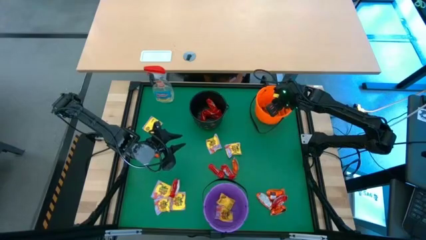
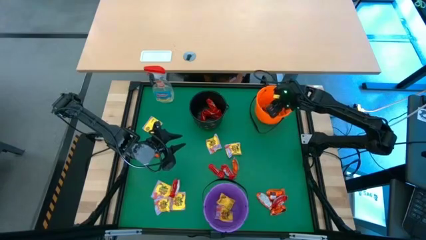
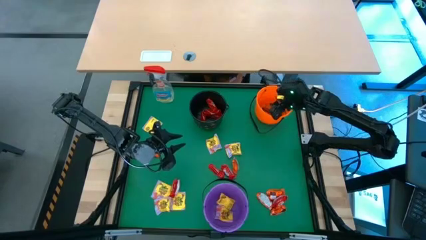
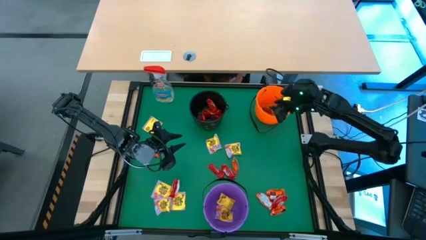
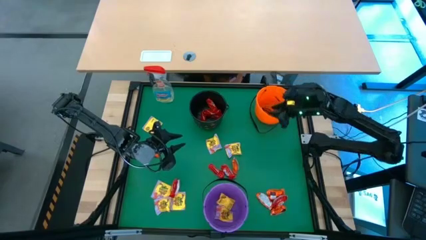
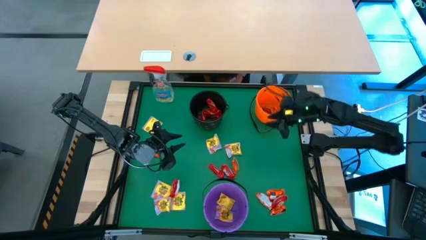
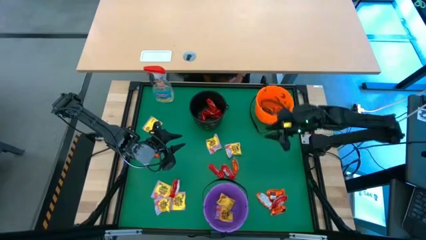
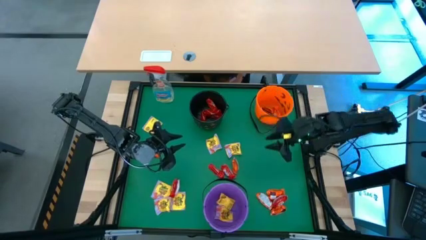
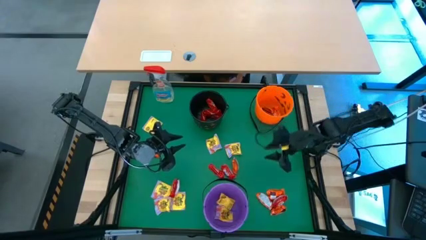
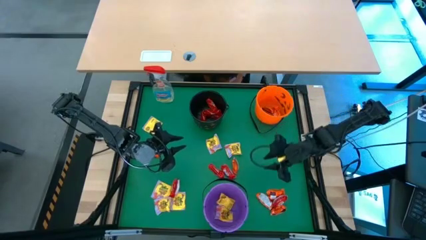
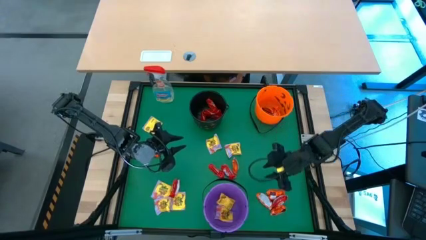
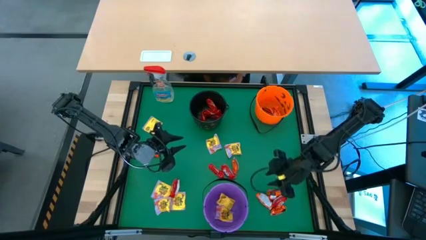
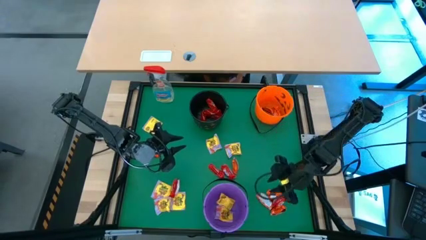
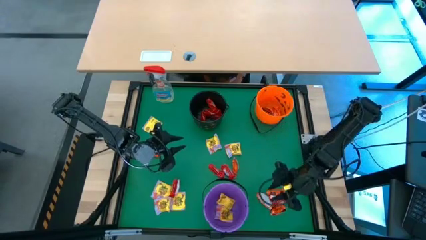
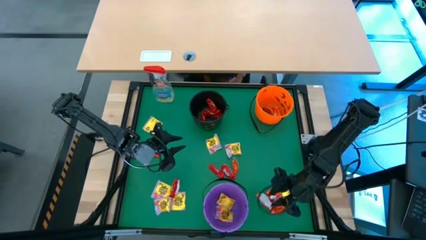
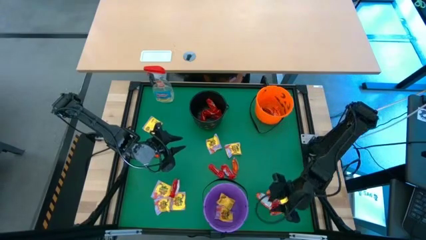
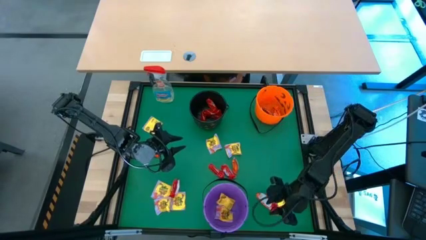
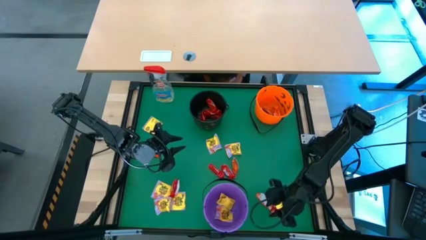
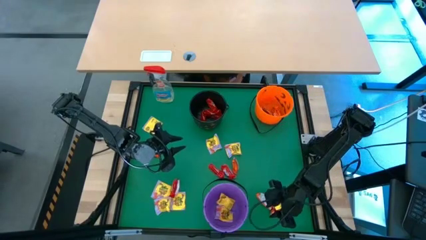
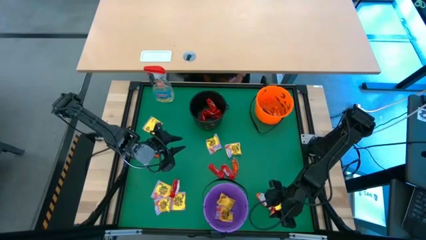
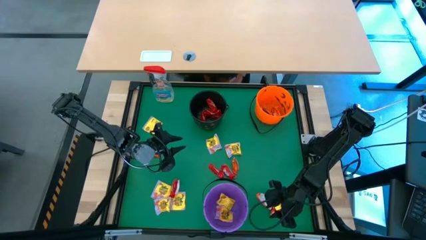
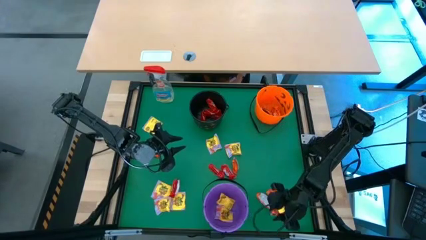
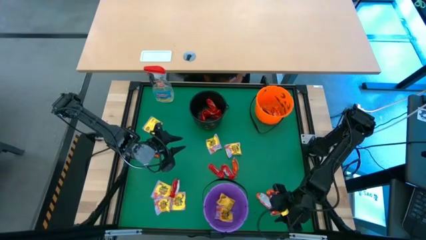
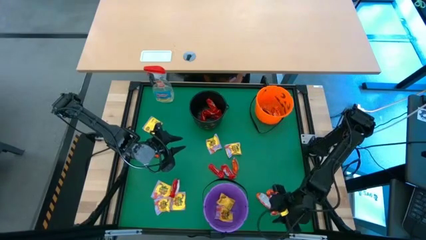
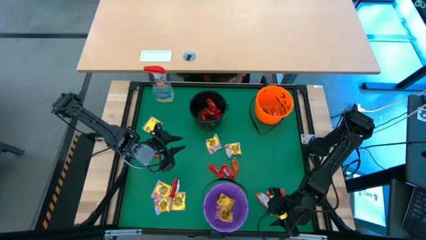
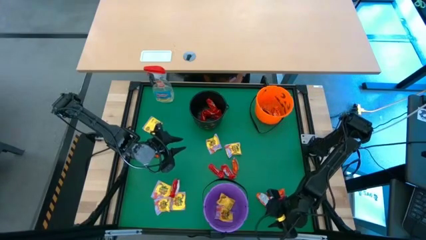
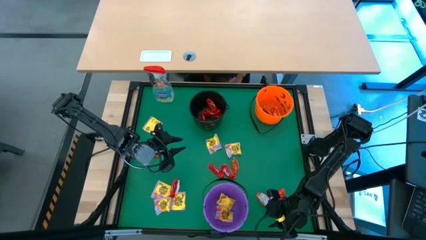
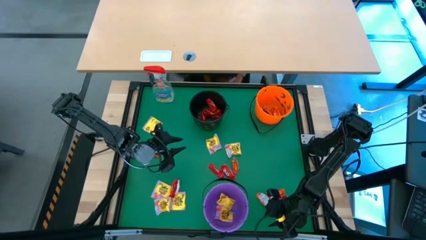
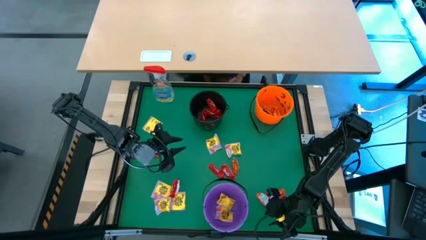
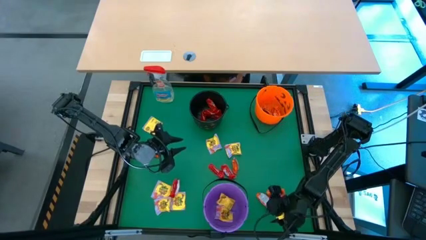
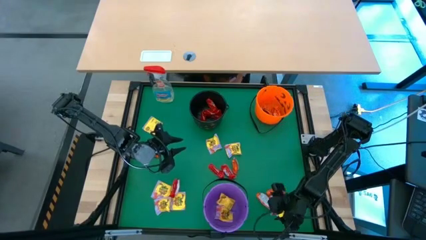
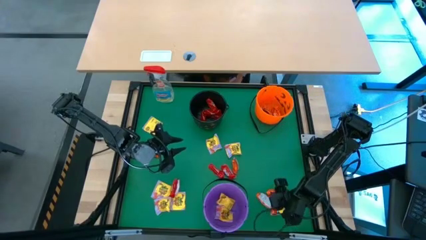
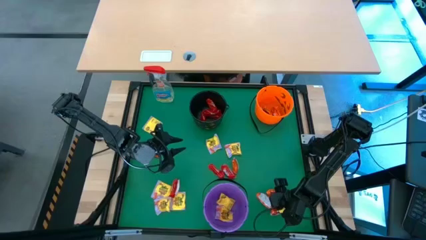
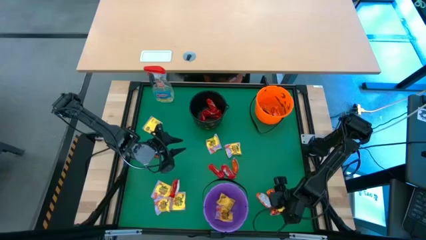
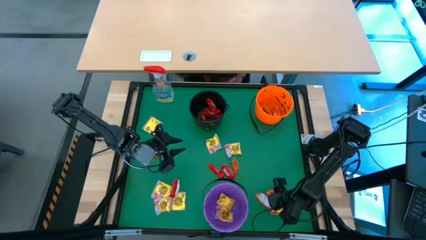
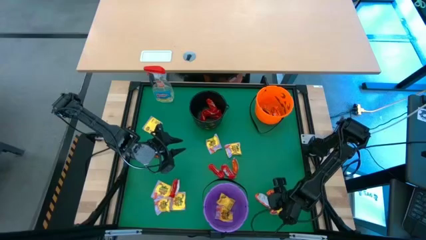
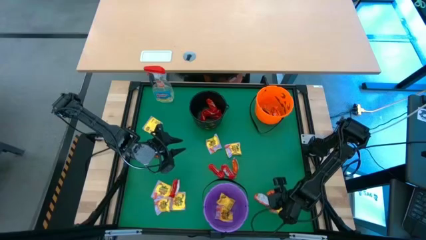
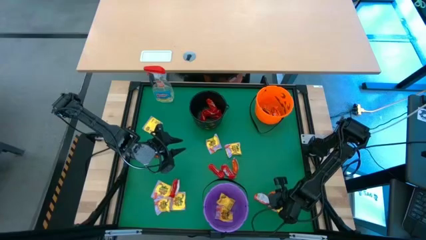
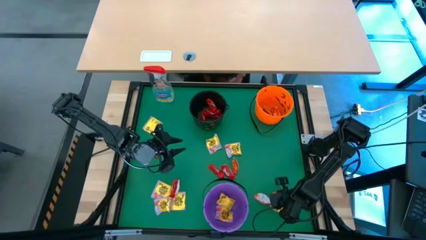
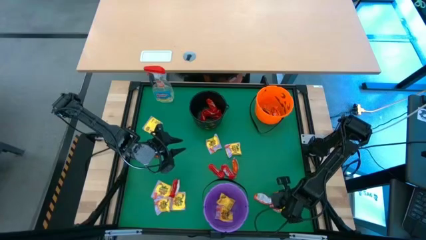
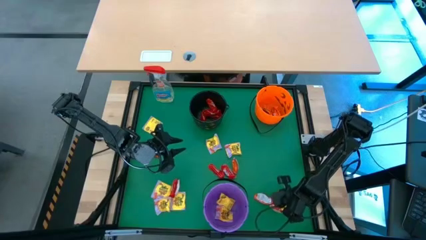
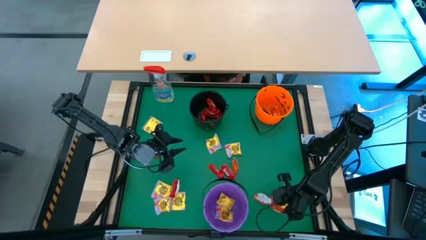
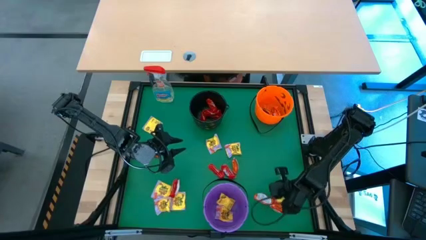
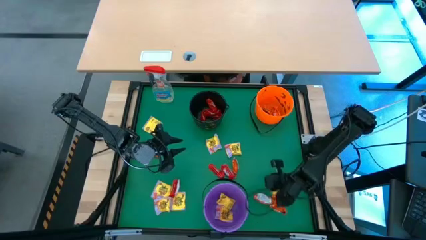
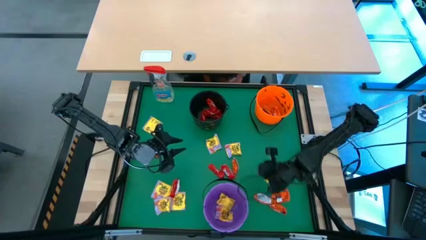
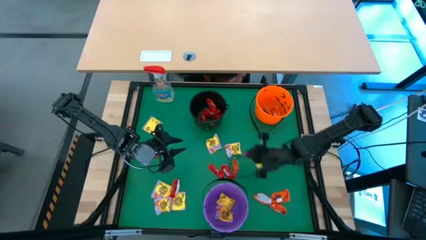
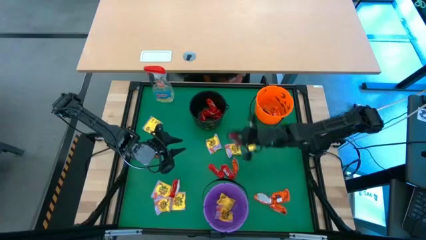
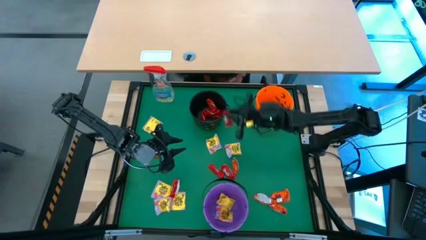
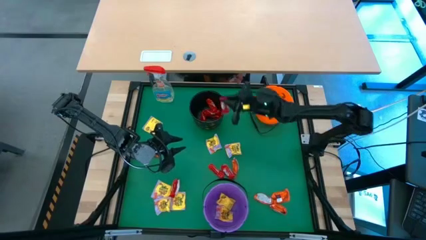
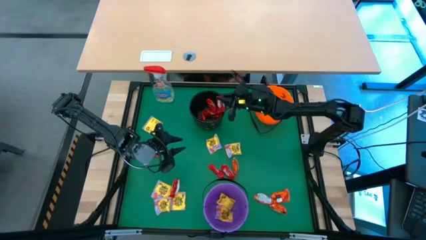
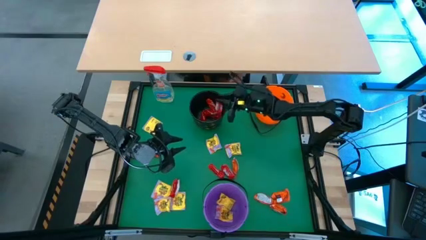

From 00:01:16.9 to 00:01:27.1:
Task: Sort candy
Put the red chocolate into the black bucket

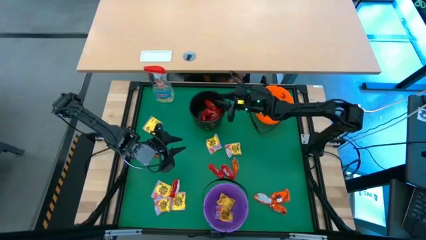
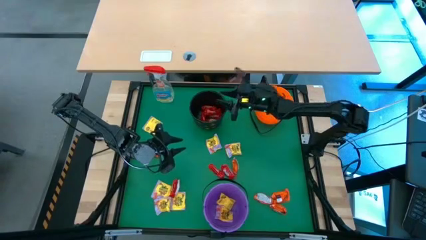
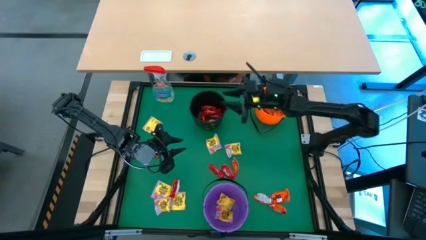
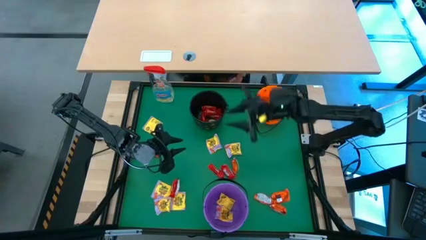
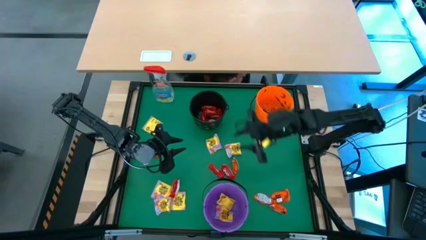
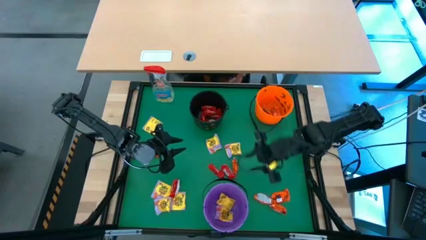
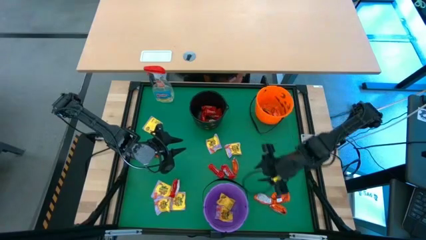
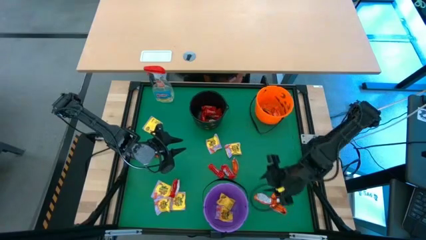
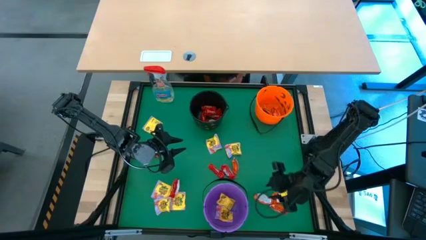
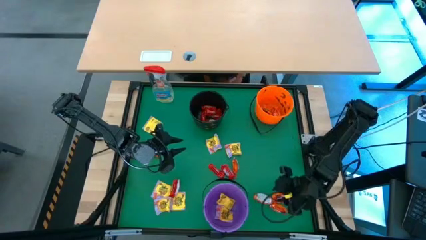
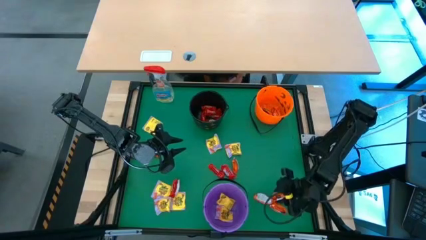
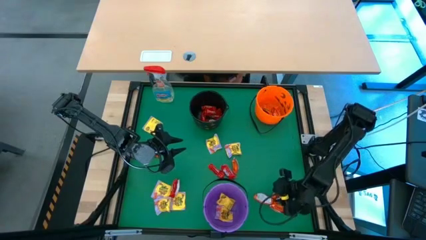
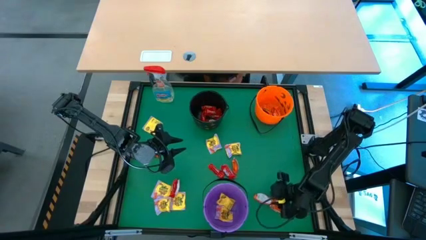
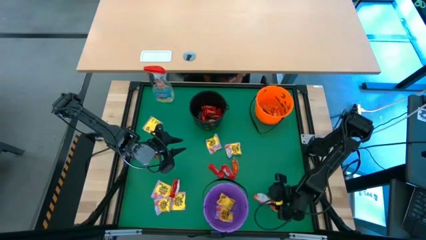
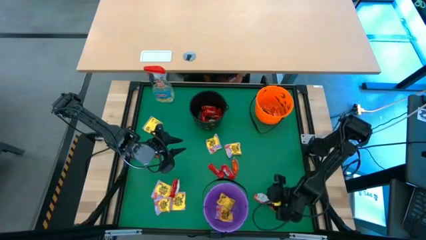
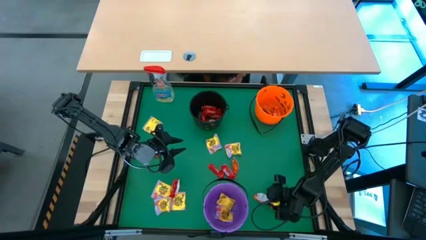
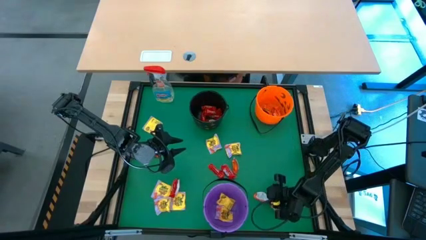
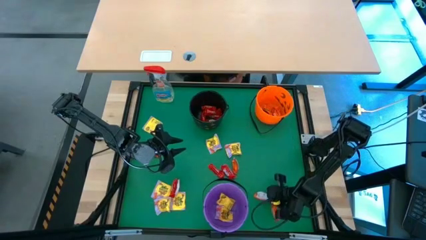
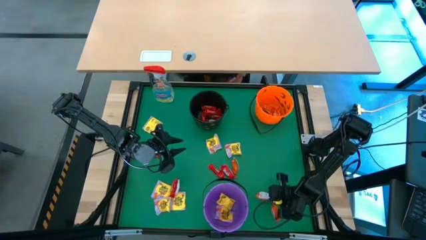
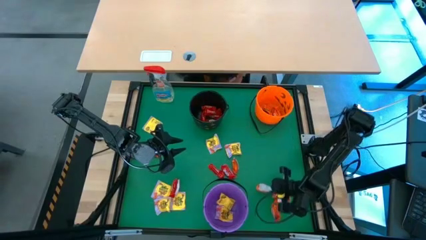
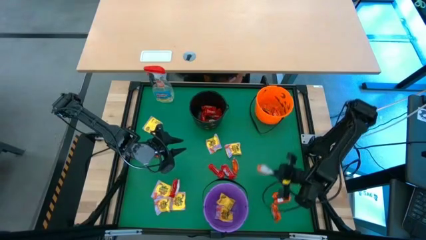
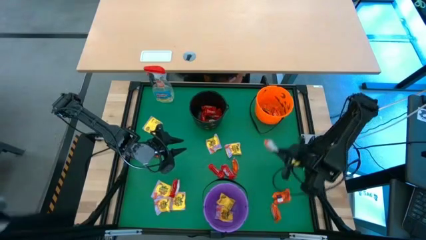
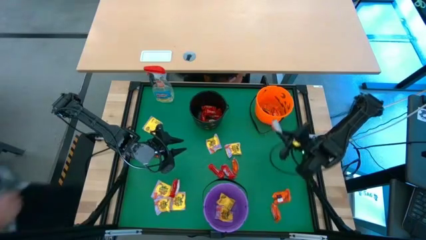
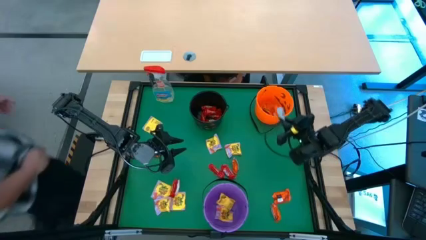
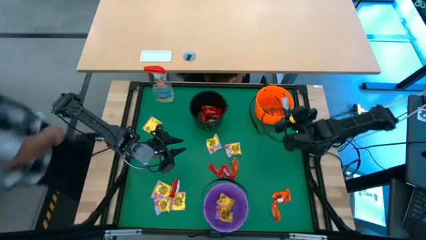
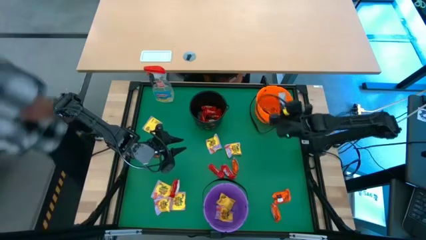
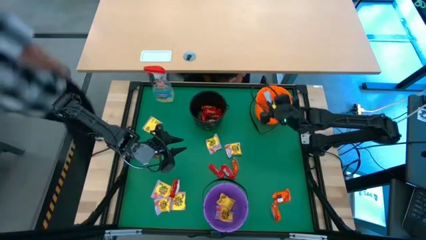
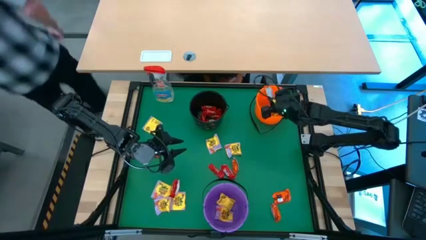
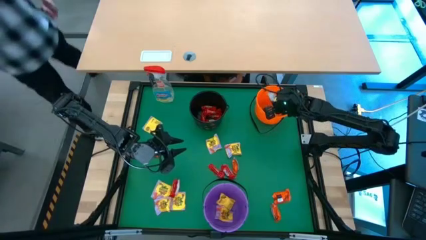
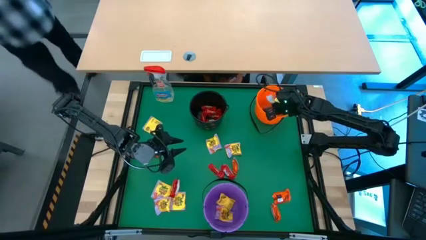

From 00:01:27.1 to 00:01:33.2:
Put the orange chocolate into the orange bucket
